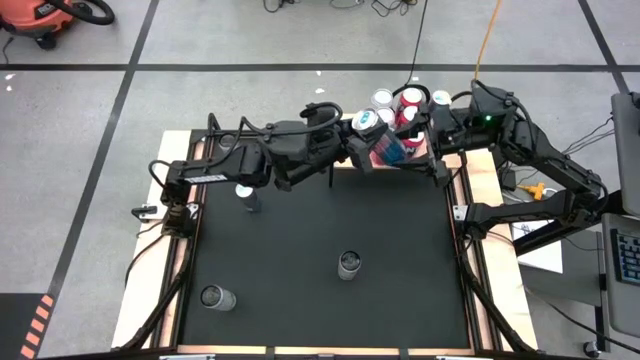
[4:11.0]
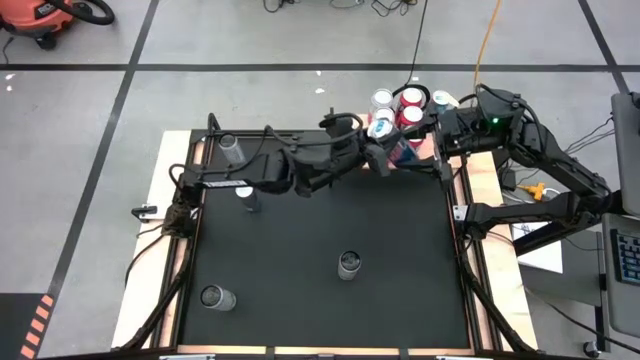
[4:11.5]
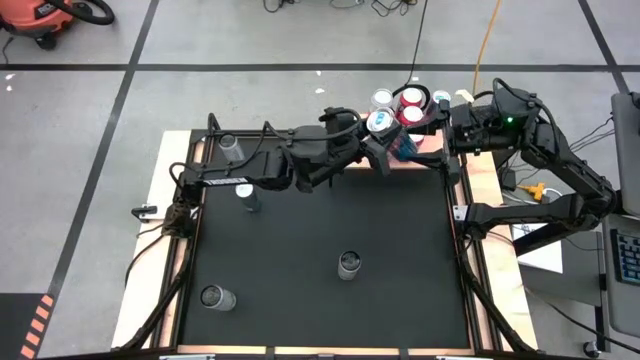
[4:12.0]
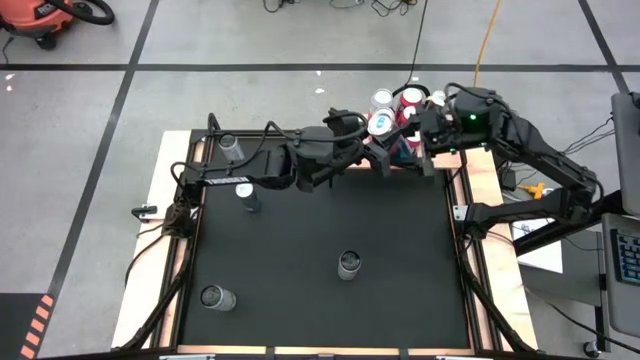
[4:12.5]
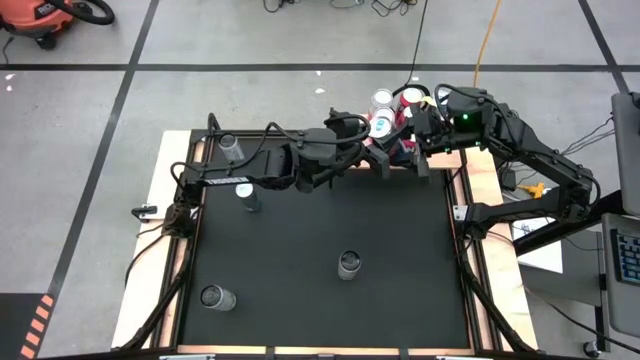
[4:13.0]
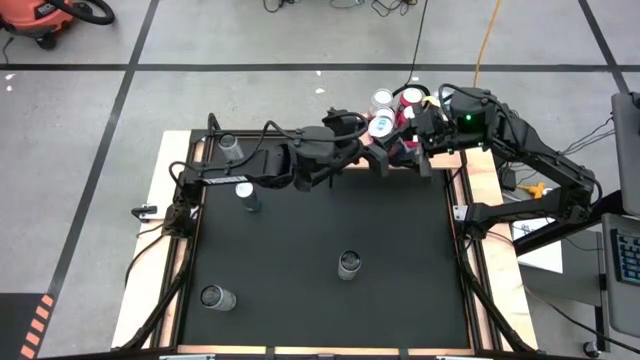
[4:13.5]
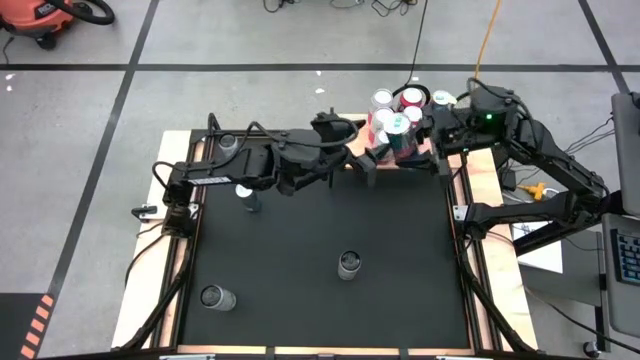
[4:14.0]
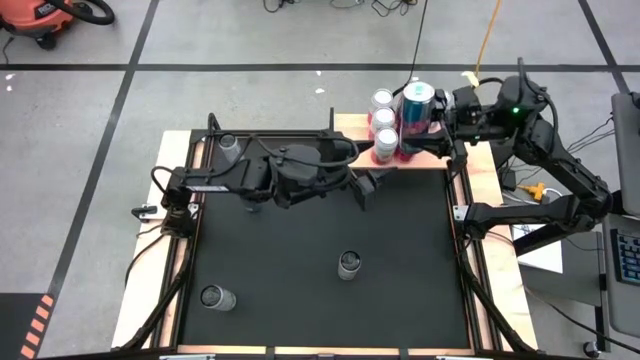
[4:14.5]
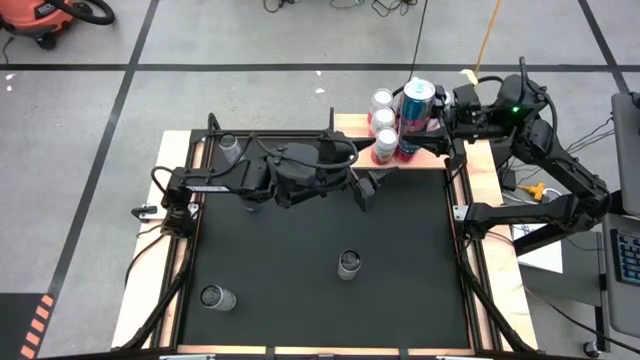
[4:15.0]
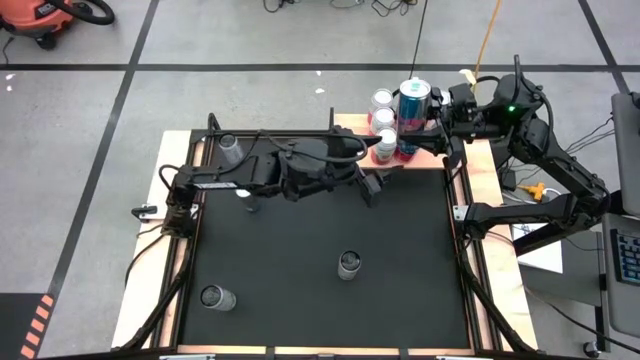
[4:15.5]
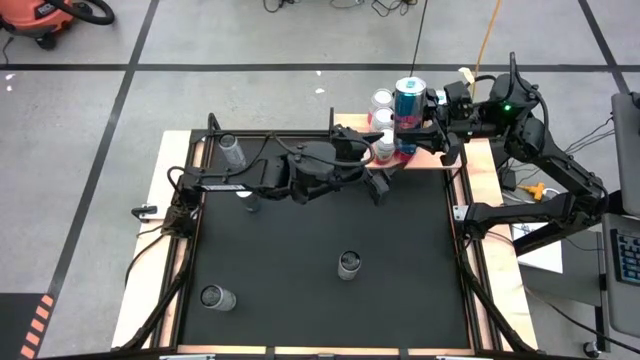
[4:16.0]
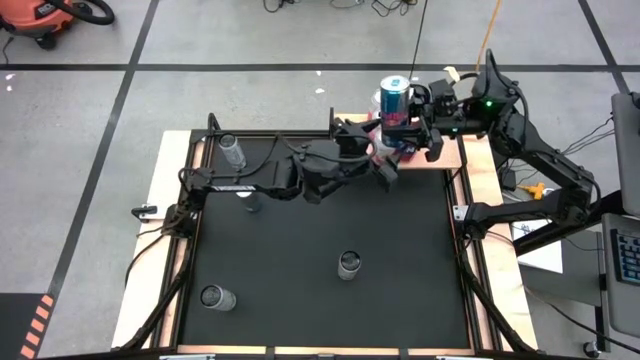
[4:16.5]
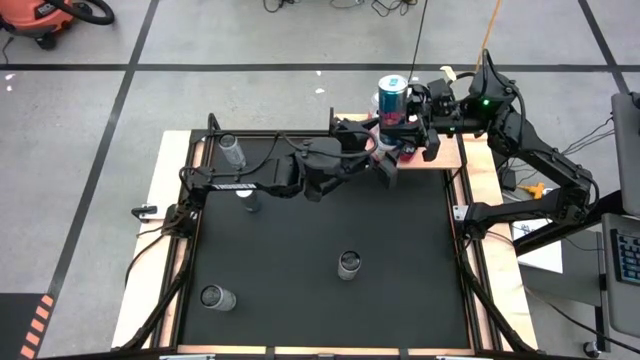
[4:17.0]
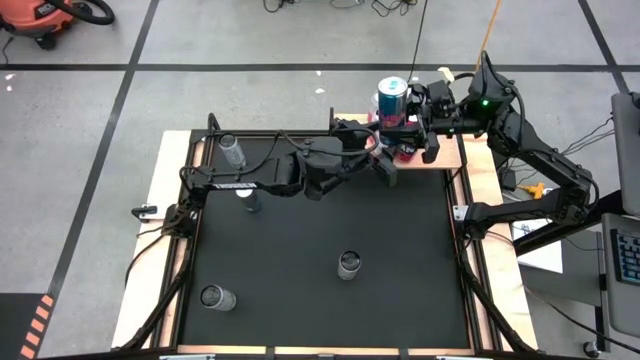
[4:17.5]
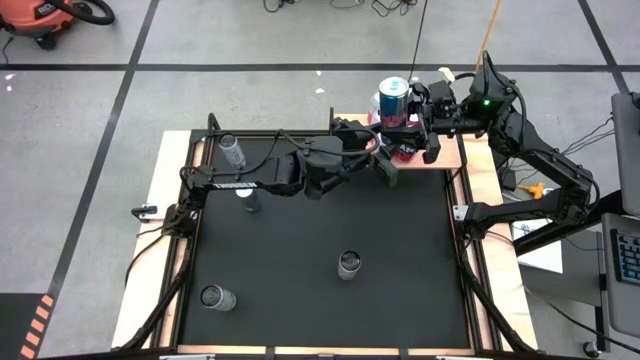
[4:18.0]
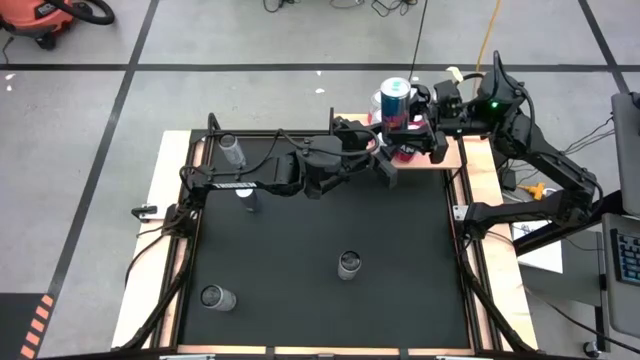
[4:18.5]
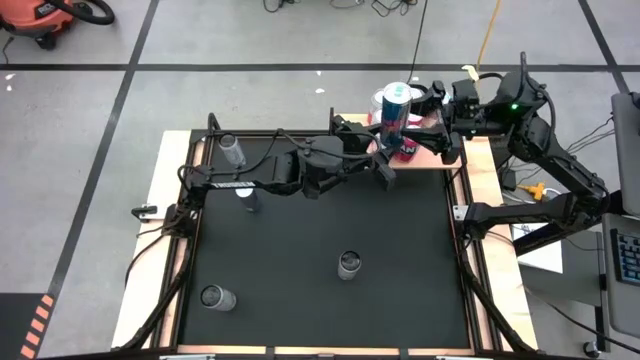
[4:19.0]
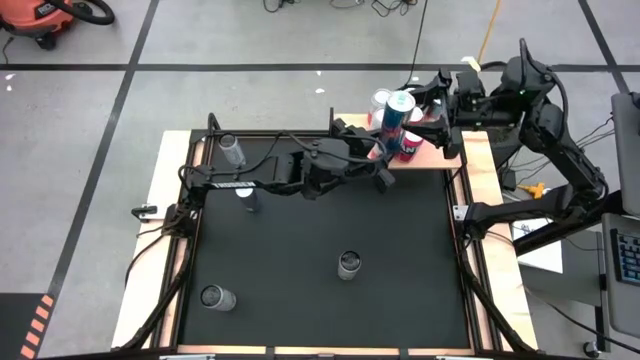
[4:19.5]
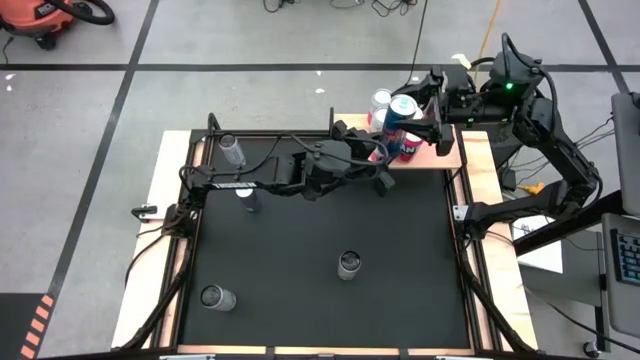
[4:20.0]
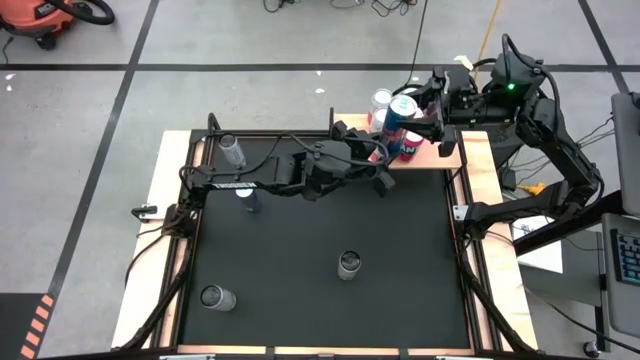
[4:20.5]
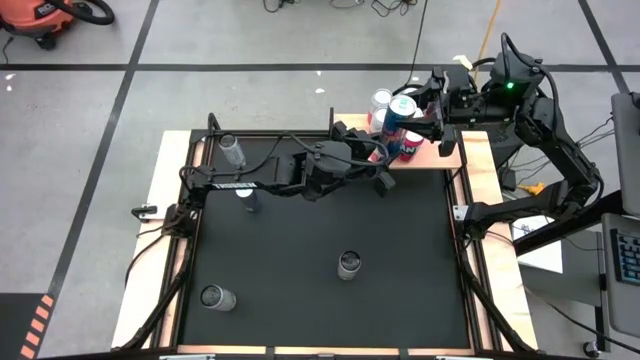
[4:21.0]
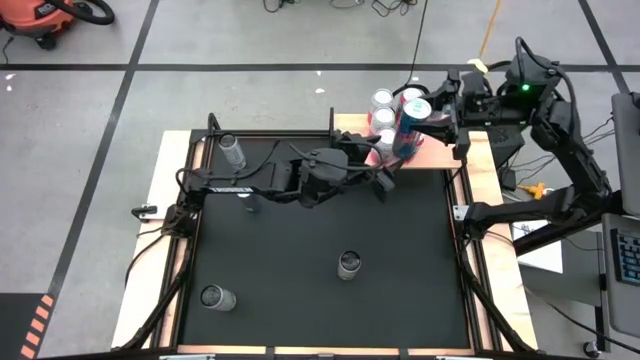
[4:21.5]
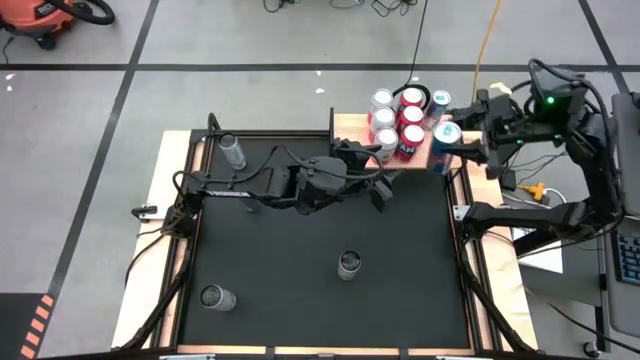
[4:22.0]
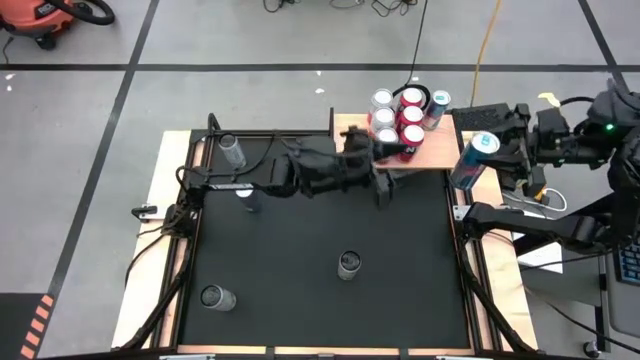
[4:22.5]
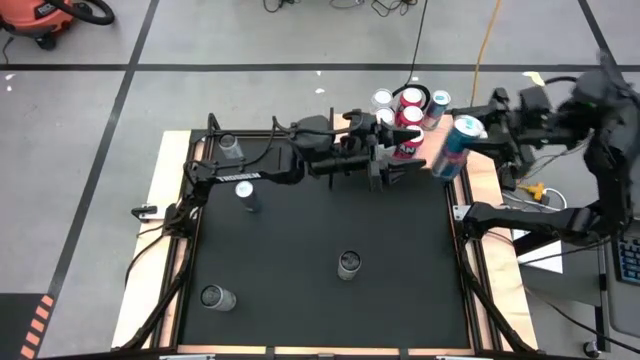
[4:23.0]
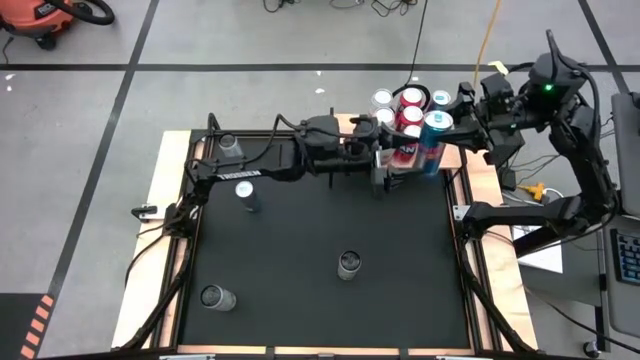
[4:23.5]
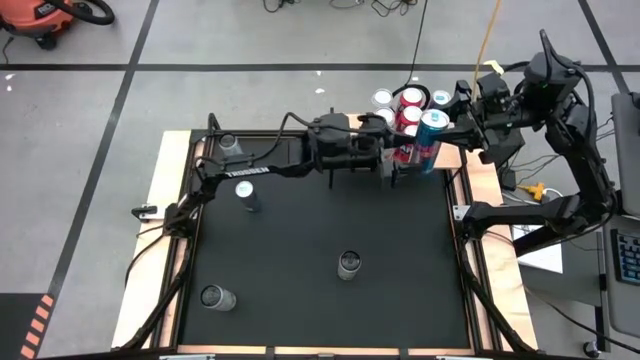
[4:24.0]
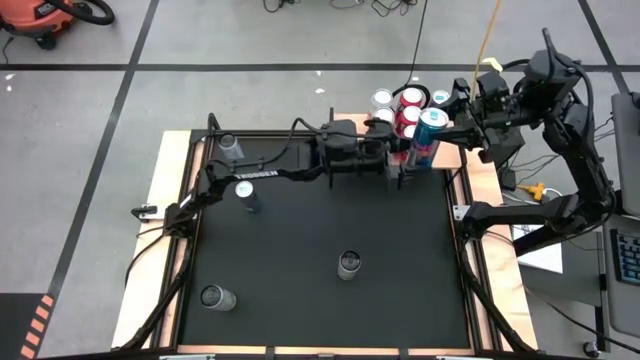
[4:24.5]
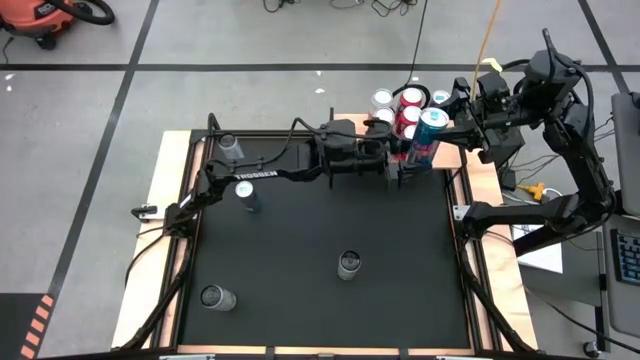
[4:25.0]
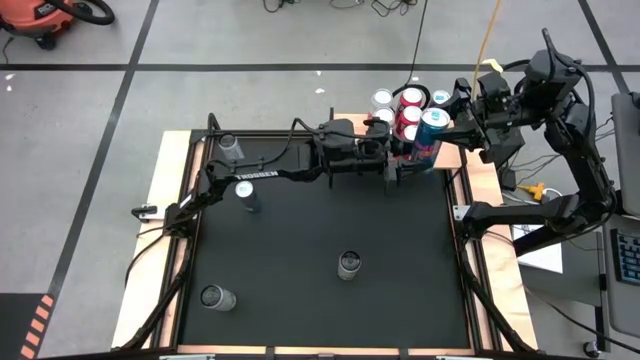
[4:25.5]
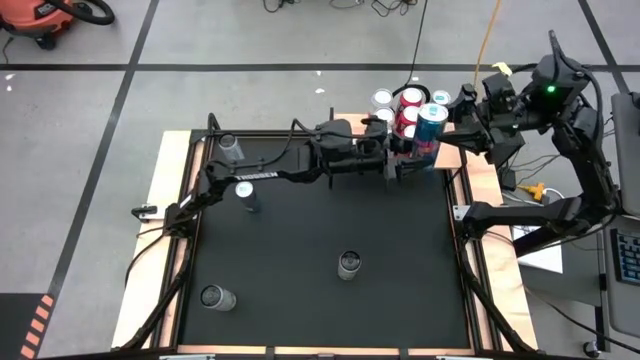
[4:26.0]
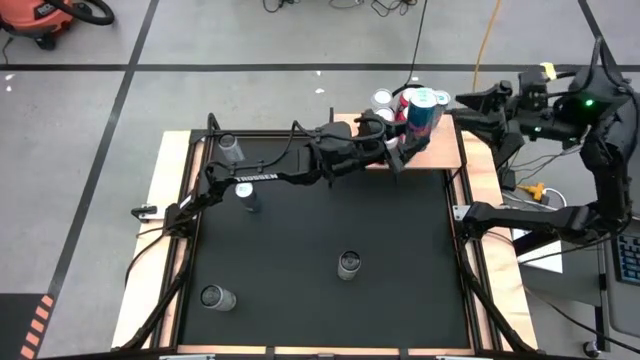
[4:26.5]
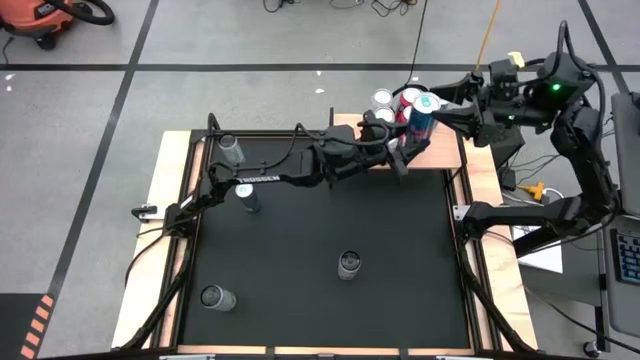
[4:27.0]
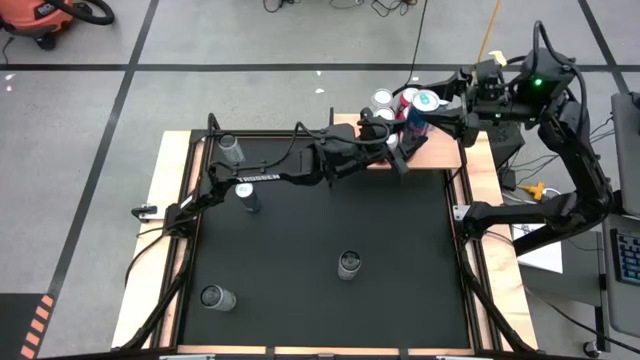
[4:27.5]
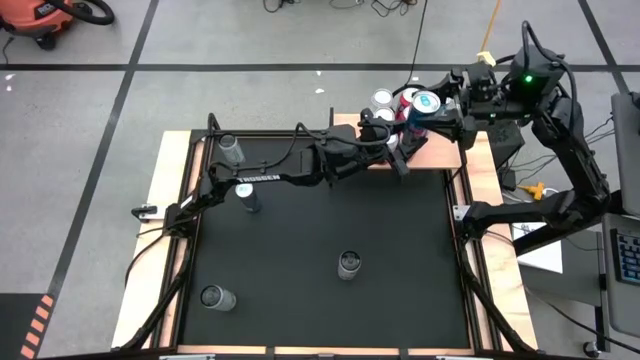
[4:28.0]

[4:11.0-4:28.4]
Task: Place canned beverage on shelf
Put the bottom blue soda can on the shelf aligned with the other blue soda can

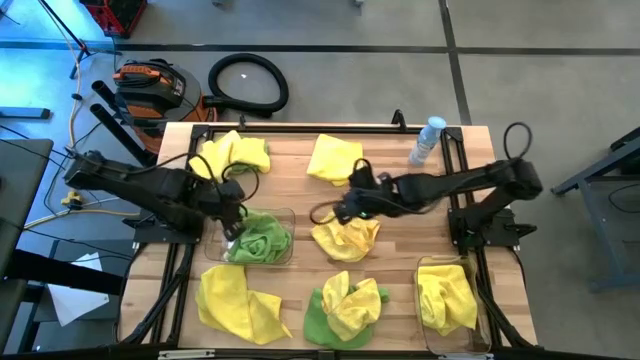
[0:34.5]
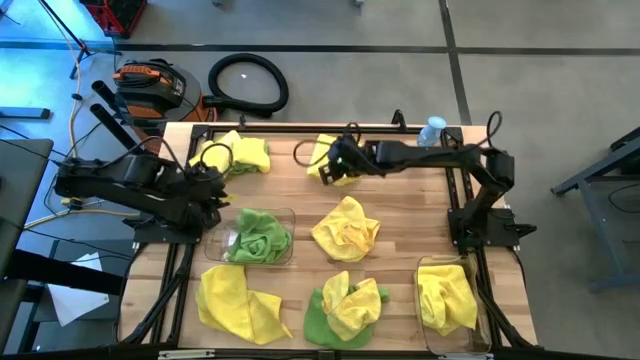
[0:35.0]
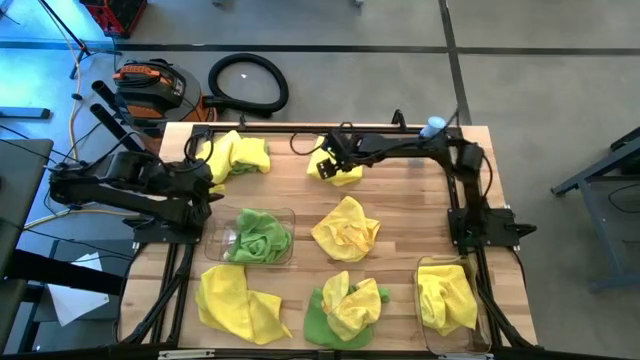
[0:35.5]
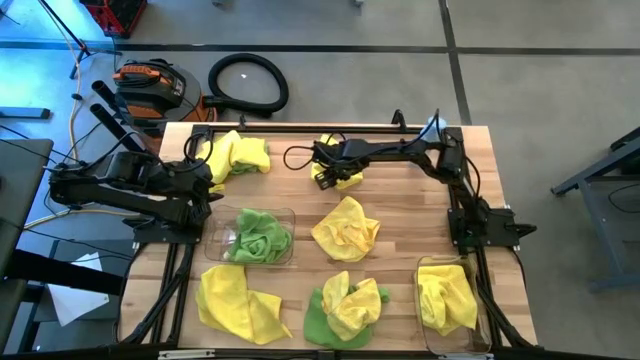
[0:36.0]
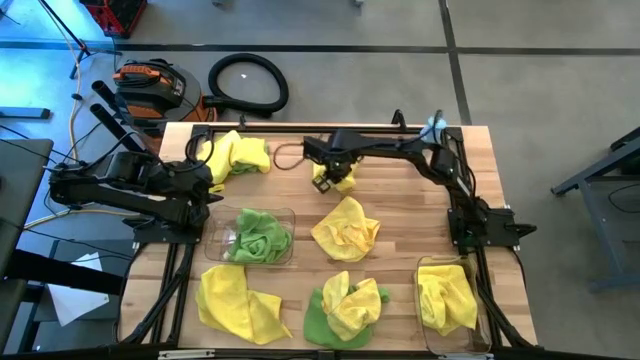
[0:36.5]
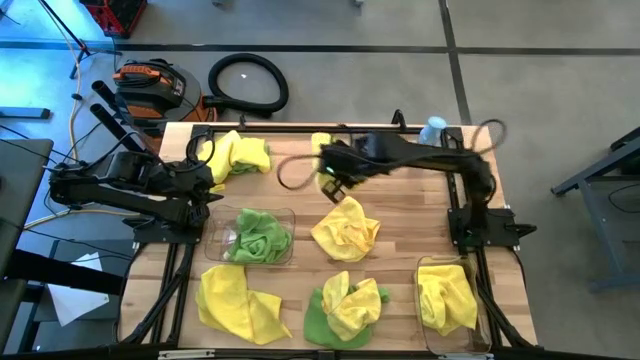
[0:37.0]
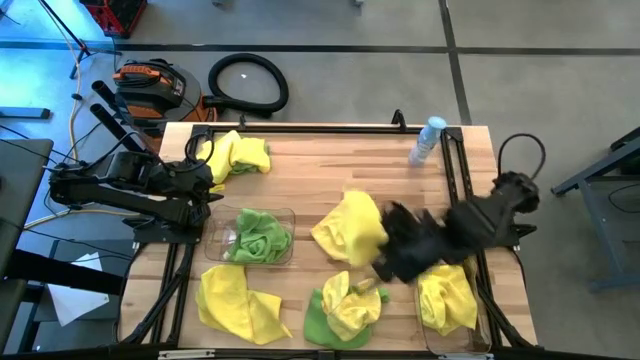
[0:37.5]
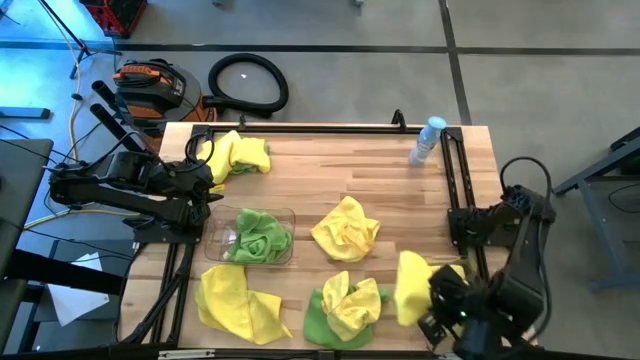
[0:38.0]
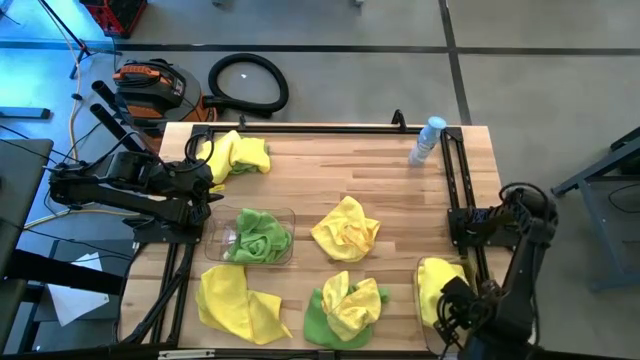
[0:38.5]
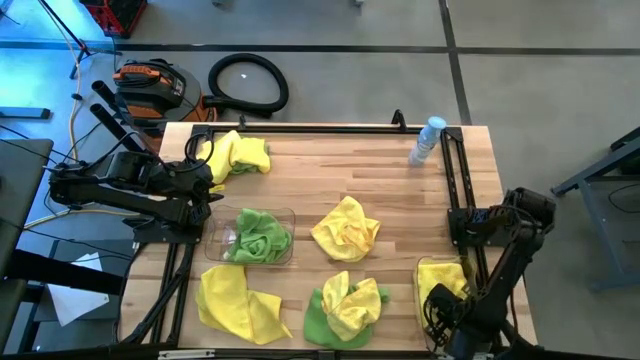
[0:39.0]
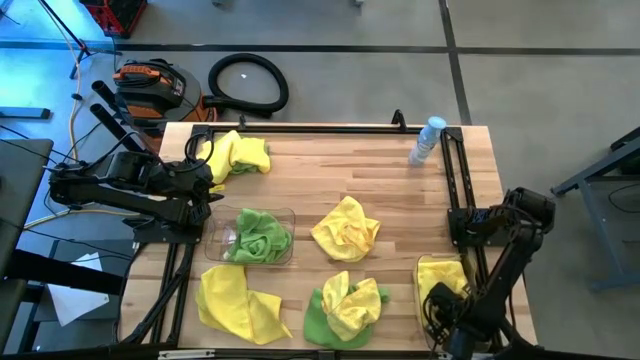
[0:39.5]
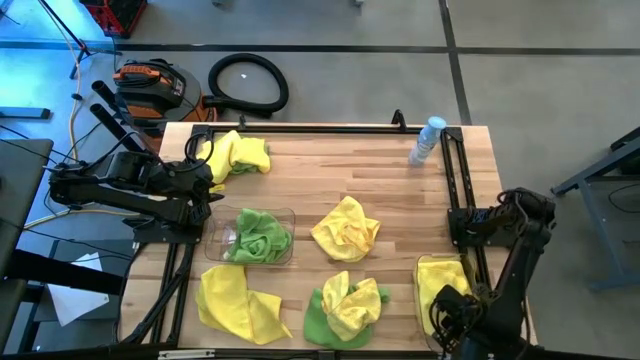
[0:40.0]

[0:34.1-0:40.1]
Task: Sort microfiber towel by color & place in baskets
Put the yellow towel into the right transparent bin
